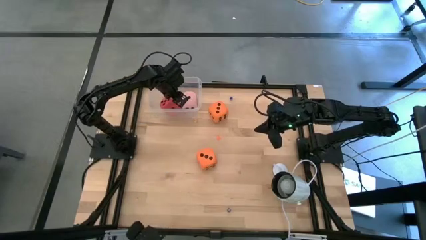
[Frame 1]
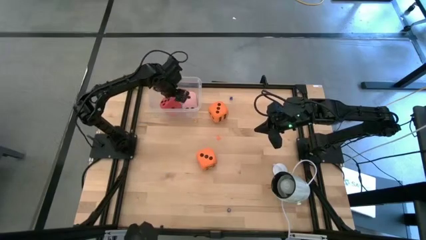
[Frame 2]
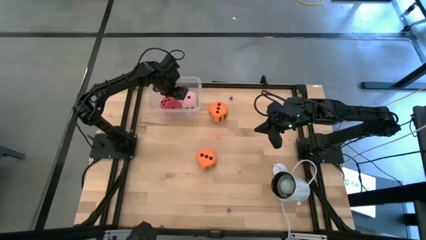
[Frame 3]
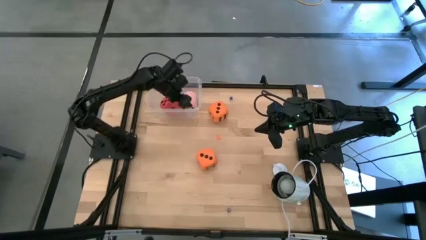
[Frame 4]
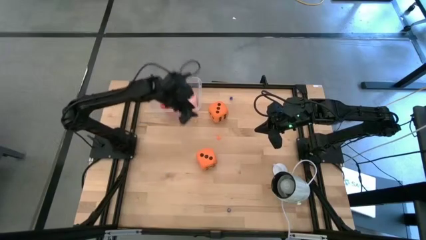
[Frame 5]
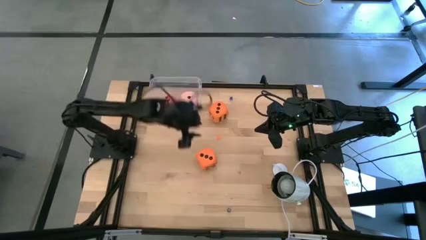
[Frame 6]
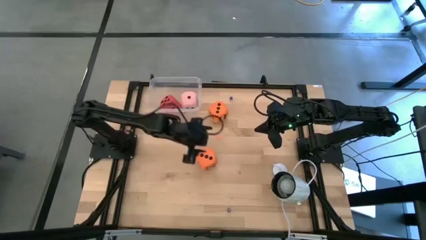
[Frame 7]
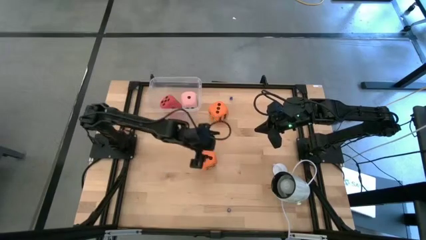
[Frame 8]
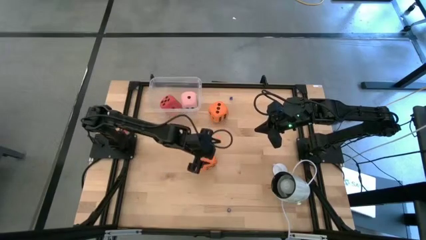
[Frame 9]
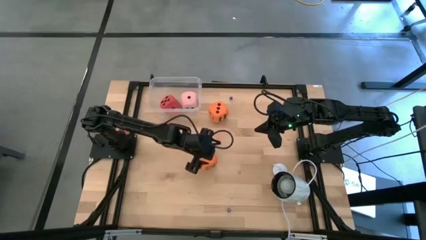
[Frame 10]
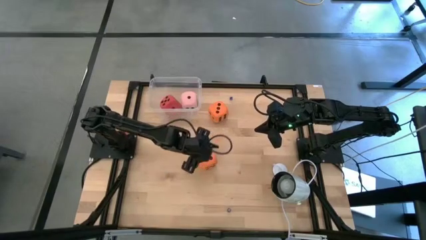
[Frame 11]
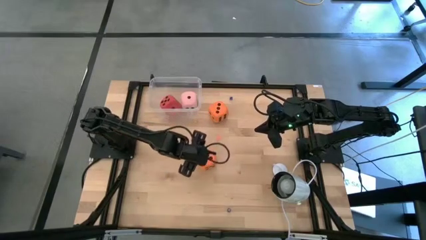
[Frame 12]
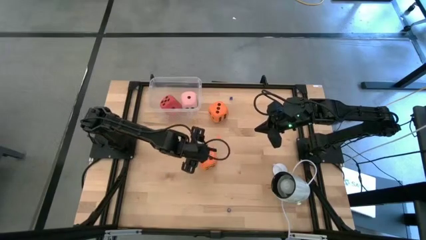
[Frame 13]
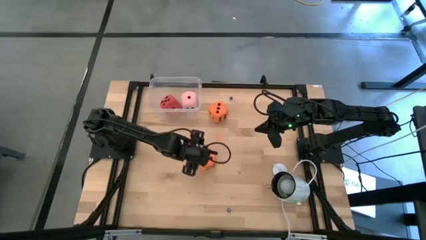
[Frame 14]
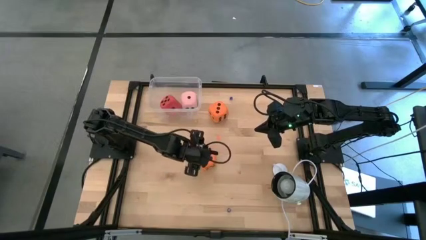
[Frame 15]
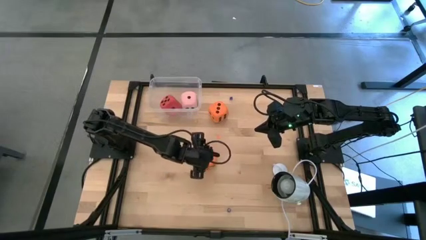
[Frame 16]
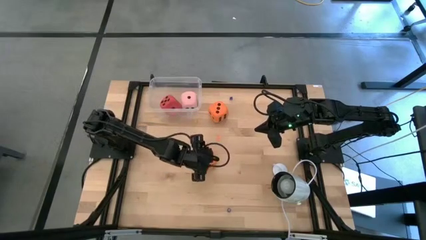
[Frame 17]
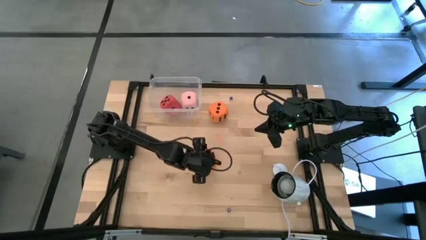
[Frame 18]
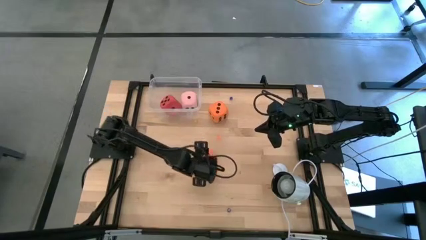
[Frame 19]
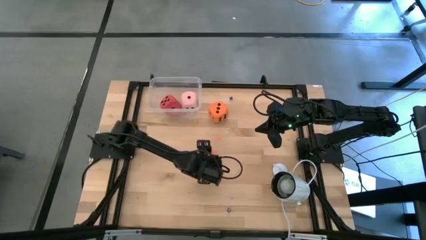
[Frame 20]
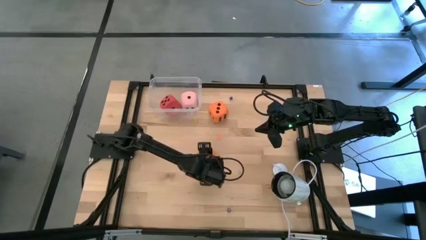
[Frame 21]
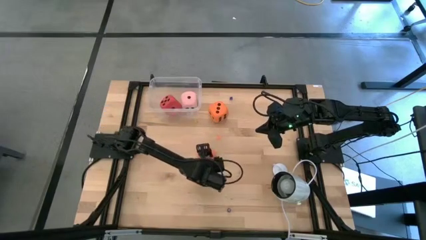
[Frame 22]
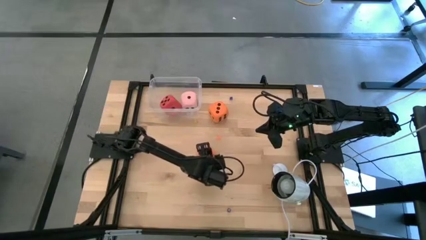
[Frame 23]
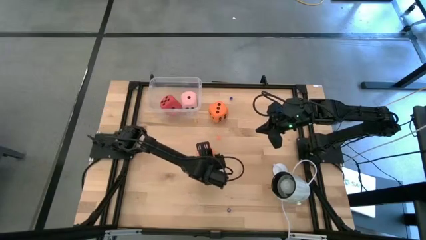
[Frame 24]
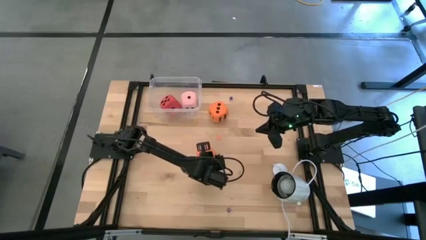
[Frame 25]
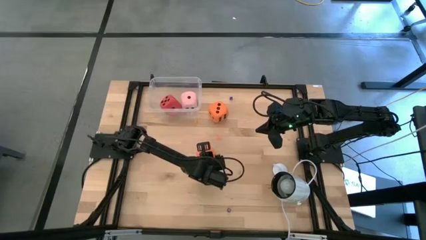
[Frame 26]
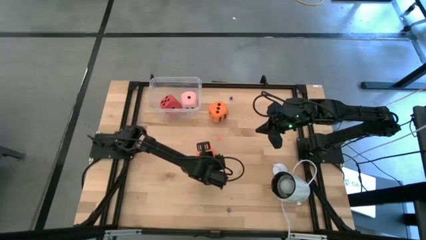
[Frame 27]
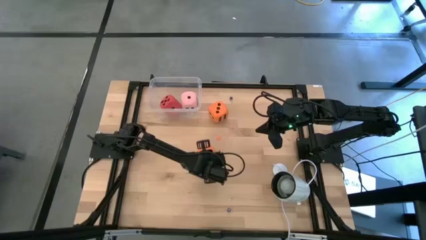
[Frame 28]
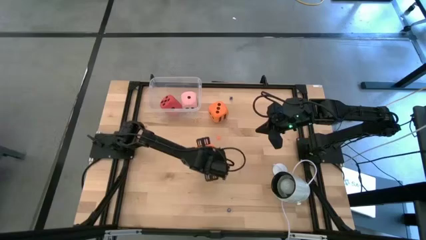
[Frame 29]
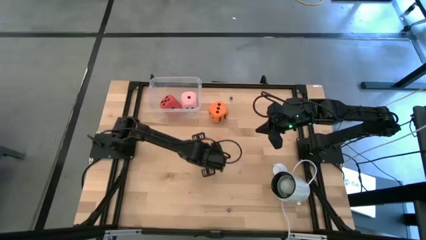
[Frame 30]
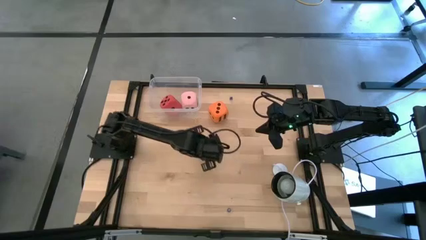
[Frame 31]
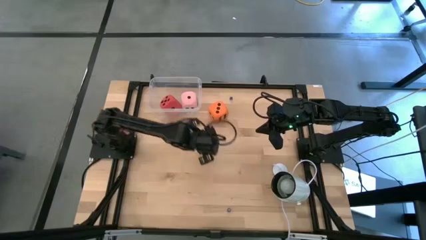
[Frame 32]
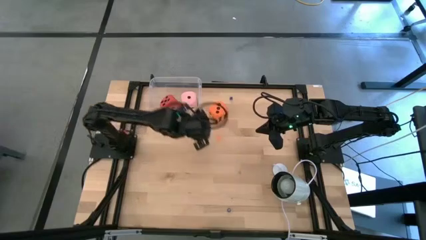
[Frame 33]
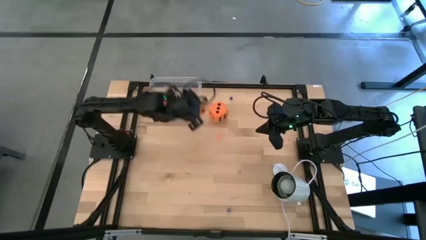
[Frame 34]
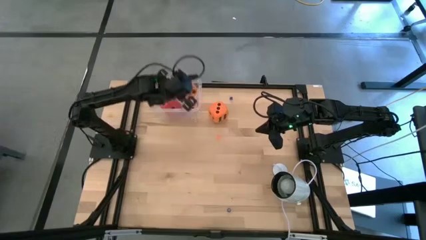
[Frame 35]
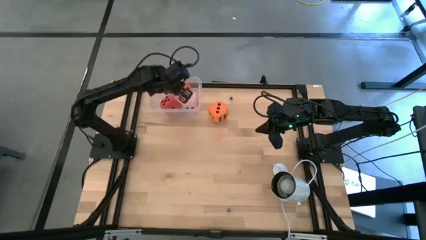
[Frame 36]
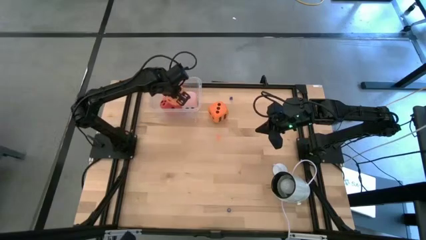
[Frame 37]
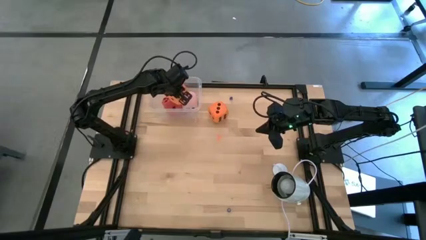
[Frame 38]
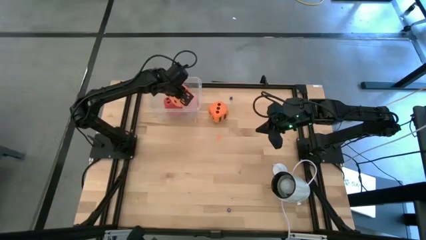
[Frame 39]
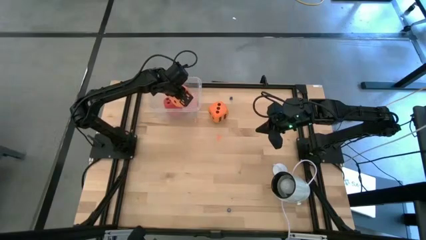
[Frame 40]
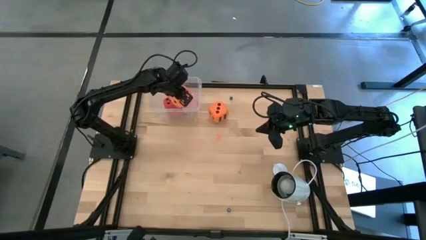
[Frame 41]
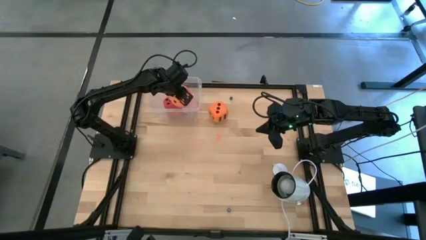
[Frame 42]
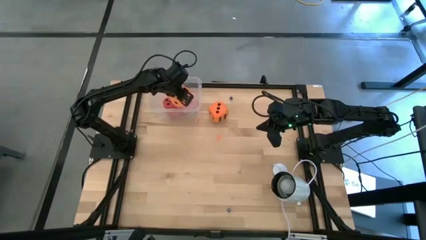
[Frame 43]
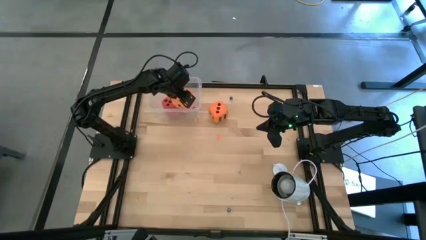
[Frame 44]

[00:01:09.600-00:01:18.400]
Task: Pick & Place Dice
Put the bottom large orange die into the transparent bin

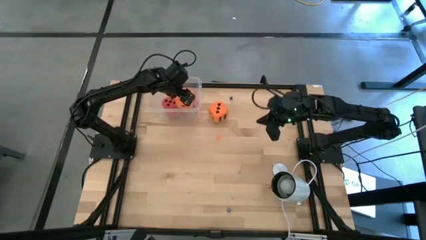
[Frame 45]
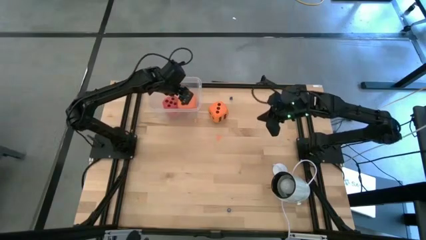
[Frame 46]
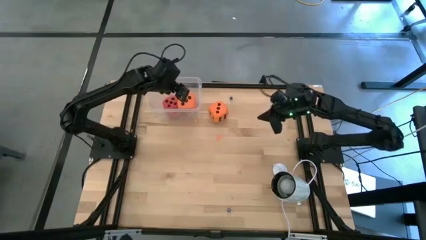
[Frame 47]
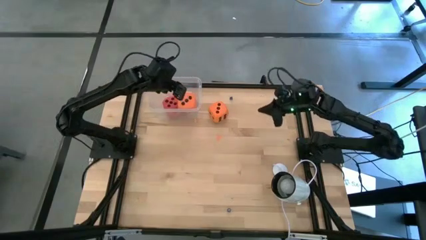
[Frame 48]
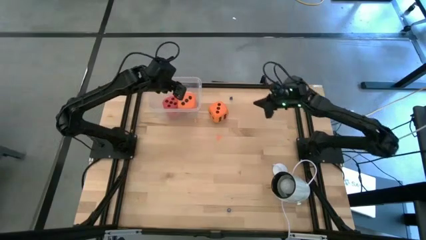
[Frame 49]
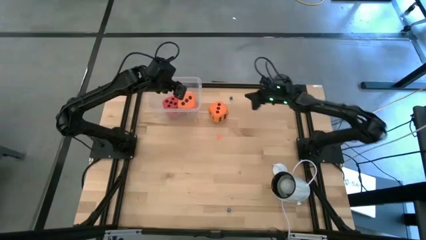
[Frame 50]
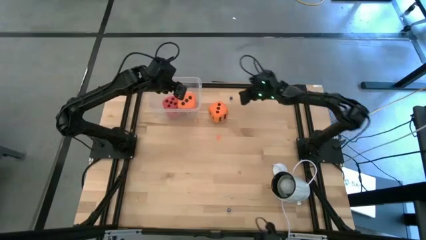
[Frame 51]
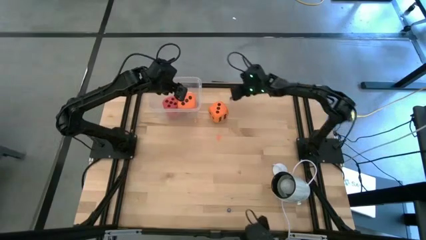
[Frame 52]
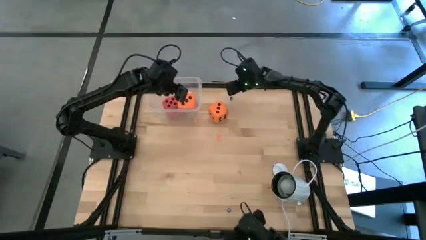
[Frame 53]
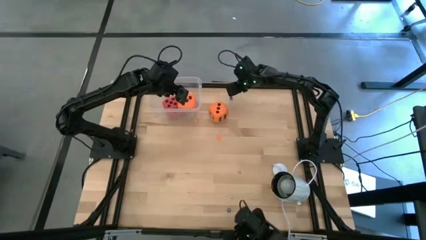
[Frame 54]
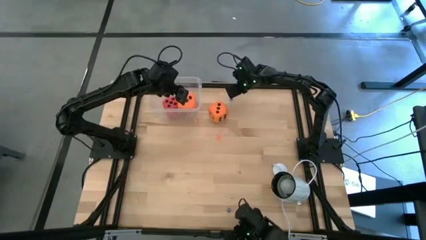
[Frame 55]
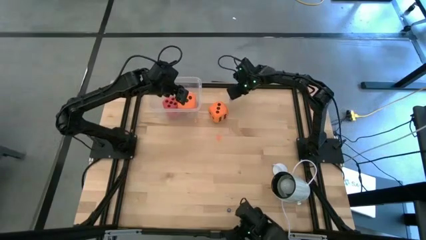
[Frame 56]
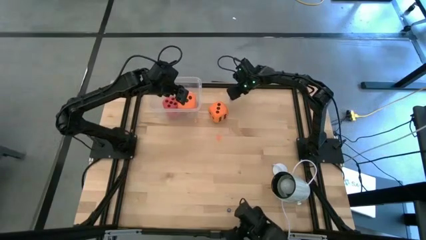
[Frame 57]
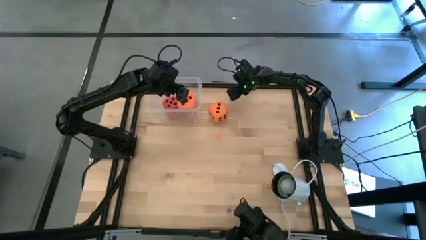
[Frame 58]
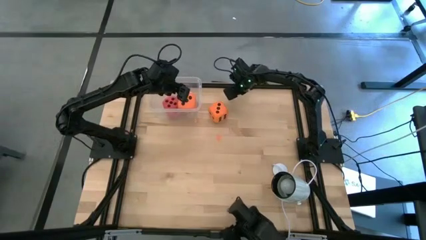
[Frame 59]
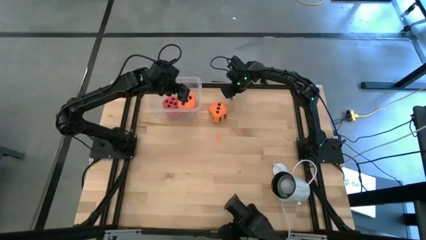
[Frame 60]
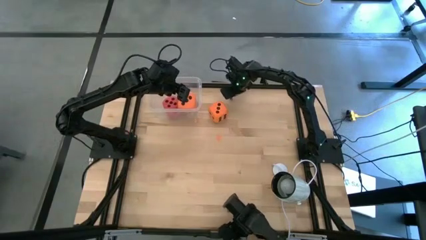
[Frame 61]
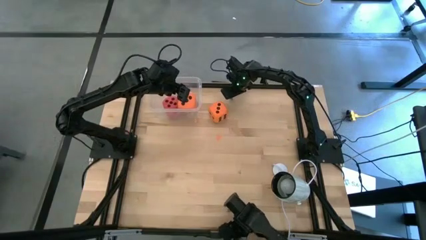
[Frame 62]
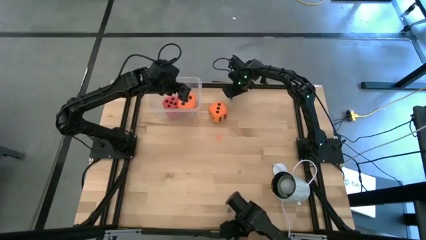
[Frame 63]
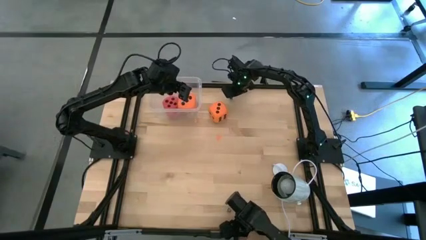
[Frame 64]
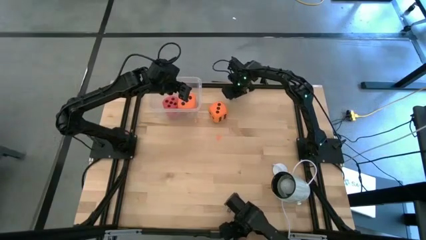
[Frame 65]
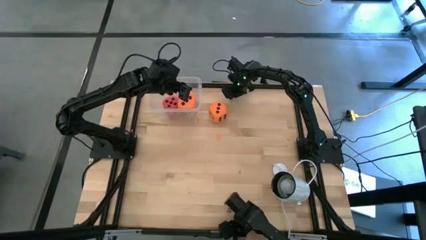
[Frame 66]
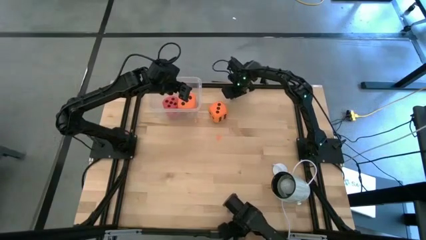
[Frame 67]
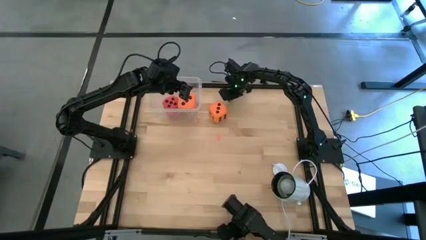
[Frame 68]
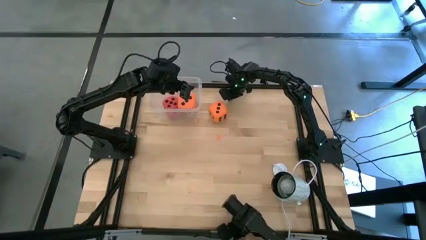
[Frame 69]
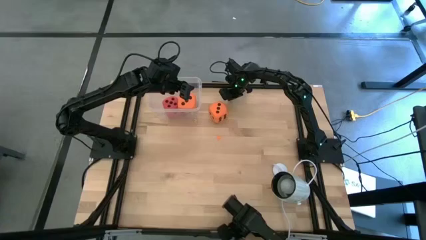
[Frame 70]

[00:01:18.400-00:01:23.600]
Put the small top blue die into the transparent bin
